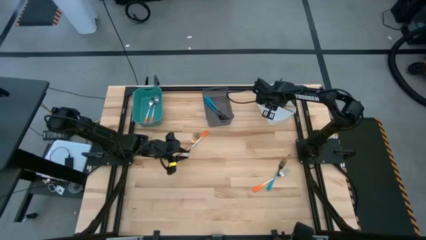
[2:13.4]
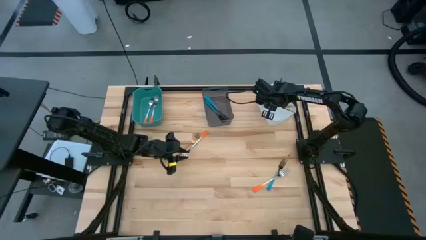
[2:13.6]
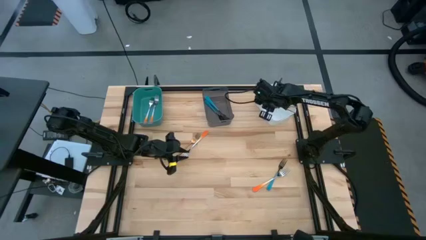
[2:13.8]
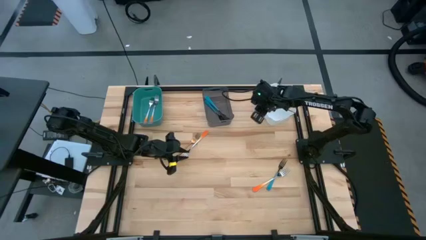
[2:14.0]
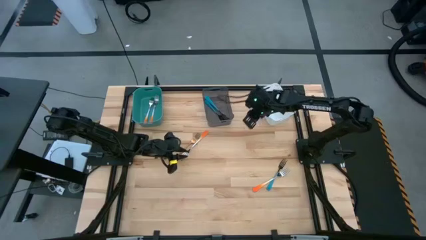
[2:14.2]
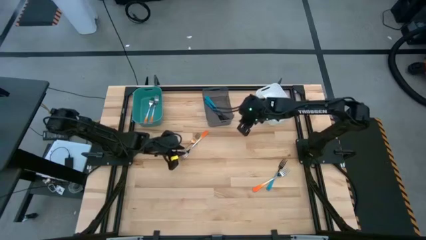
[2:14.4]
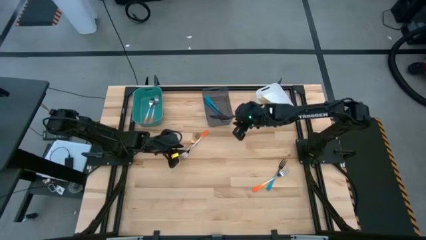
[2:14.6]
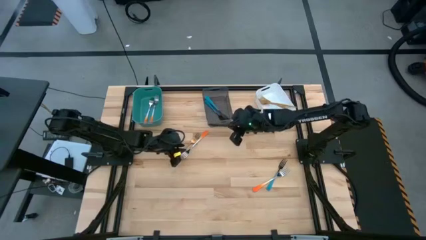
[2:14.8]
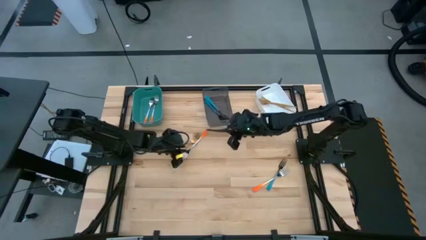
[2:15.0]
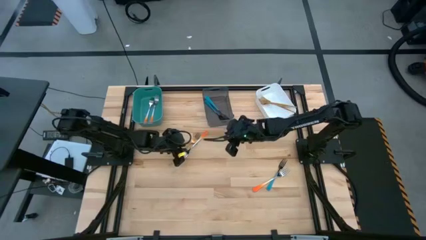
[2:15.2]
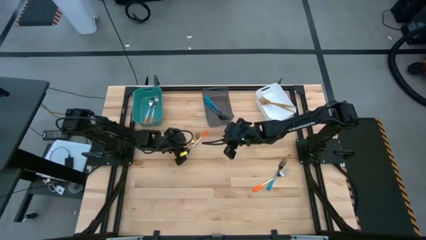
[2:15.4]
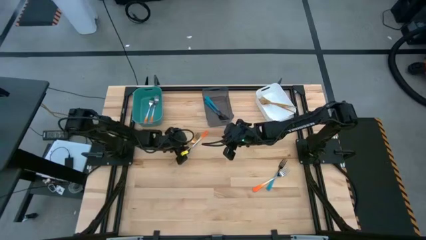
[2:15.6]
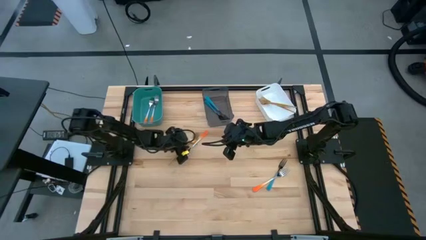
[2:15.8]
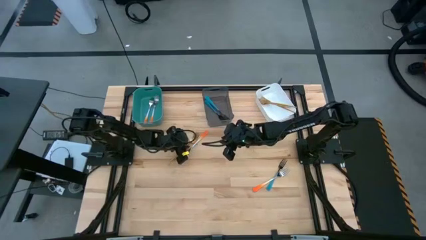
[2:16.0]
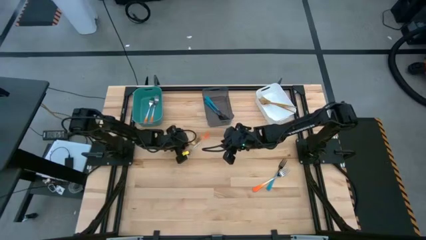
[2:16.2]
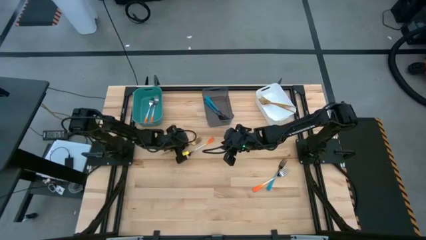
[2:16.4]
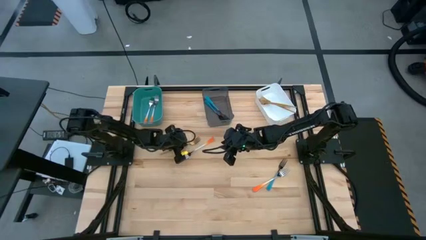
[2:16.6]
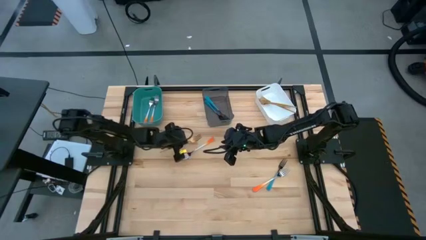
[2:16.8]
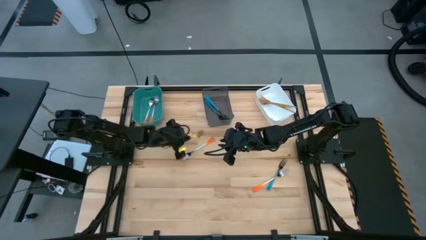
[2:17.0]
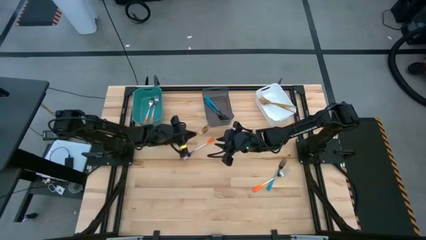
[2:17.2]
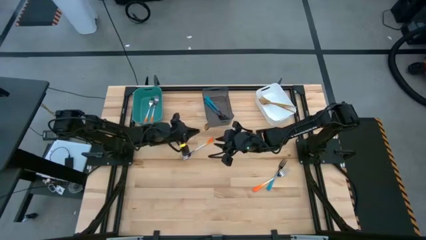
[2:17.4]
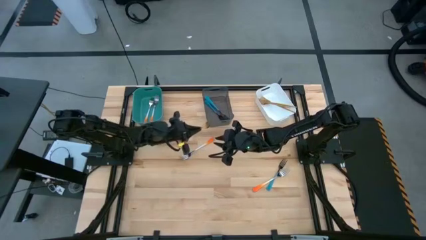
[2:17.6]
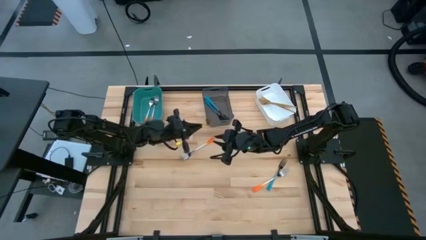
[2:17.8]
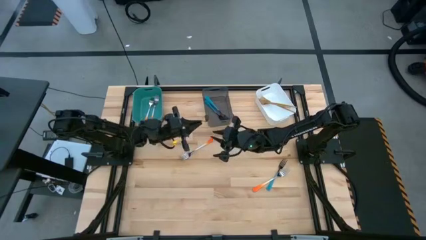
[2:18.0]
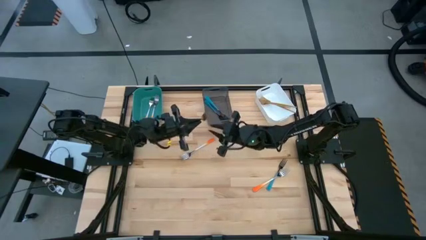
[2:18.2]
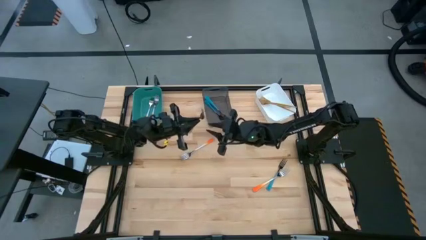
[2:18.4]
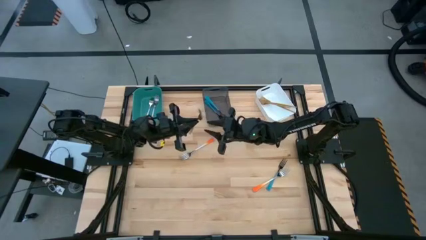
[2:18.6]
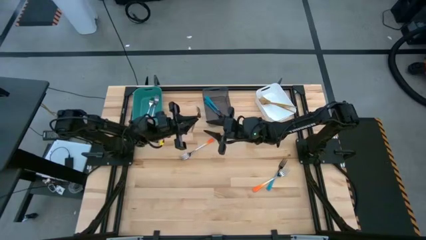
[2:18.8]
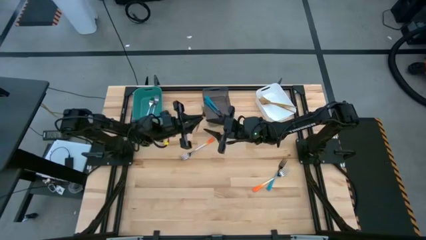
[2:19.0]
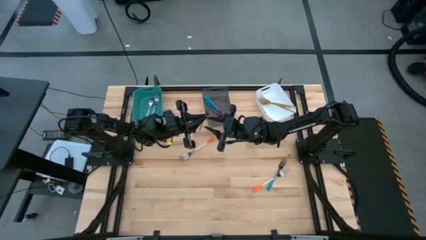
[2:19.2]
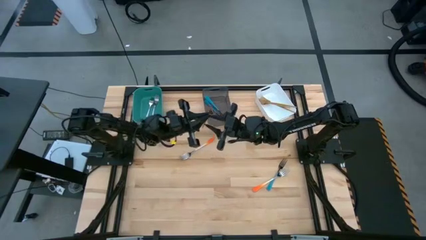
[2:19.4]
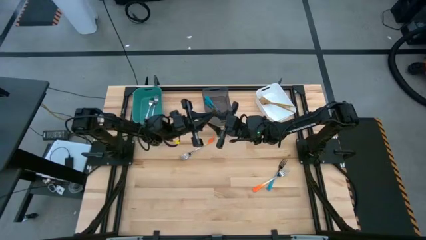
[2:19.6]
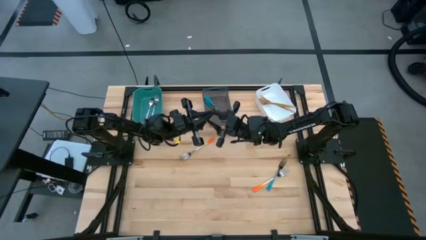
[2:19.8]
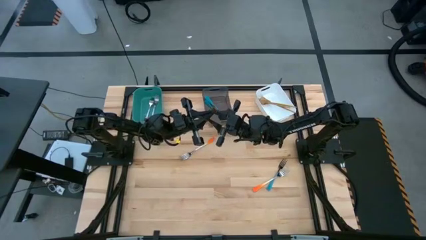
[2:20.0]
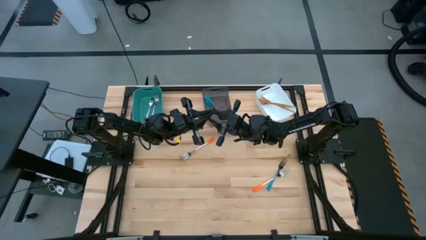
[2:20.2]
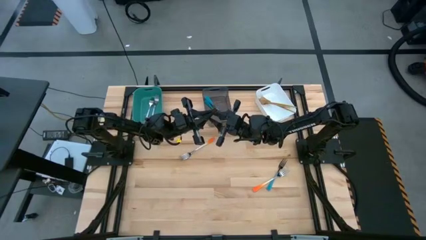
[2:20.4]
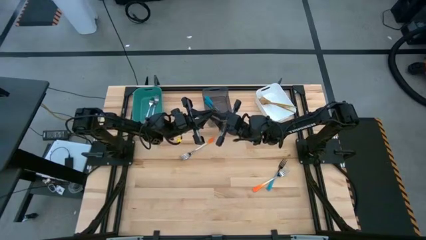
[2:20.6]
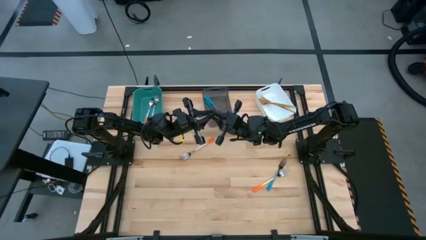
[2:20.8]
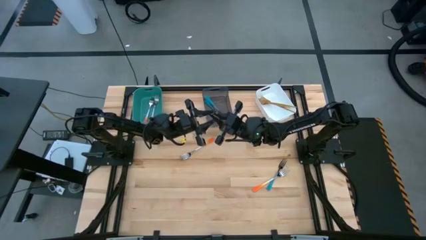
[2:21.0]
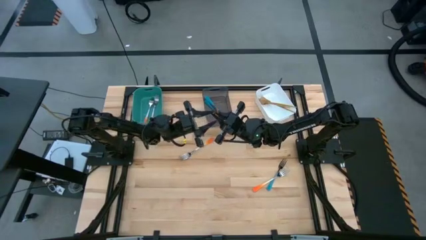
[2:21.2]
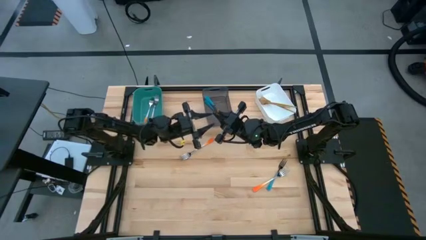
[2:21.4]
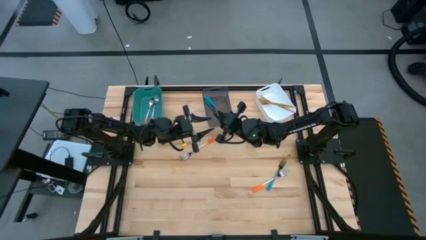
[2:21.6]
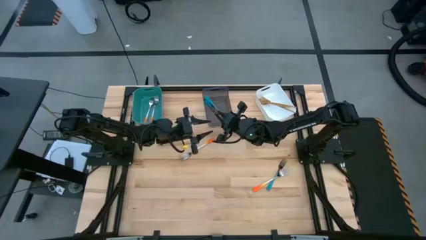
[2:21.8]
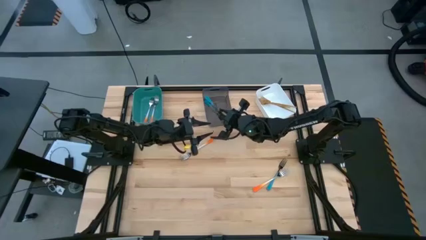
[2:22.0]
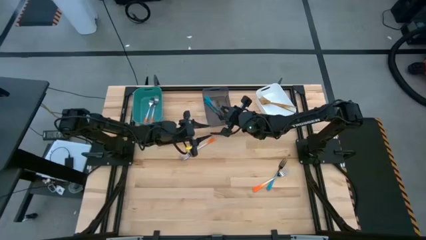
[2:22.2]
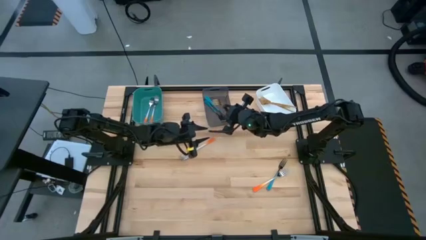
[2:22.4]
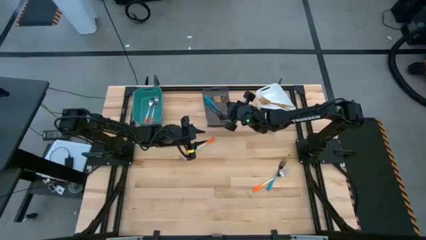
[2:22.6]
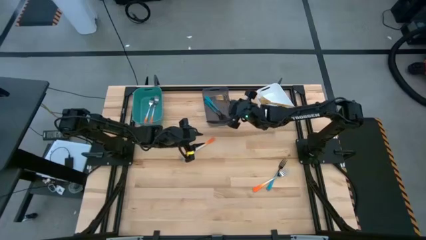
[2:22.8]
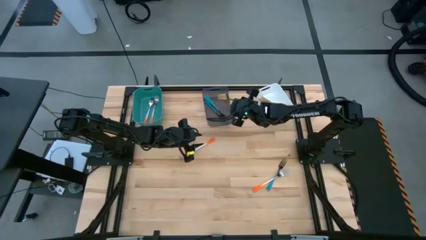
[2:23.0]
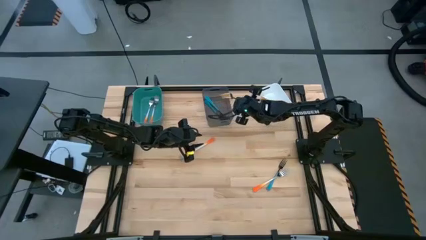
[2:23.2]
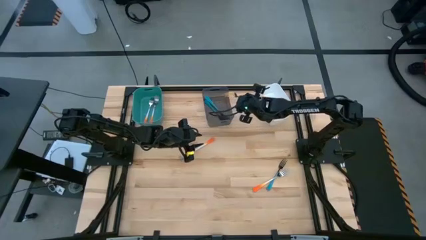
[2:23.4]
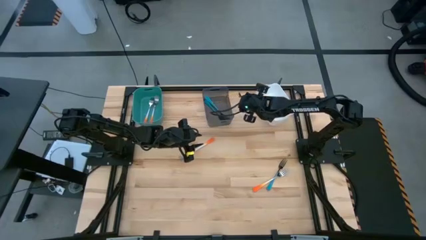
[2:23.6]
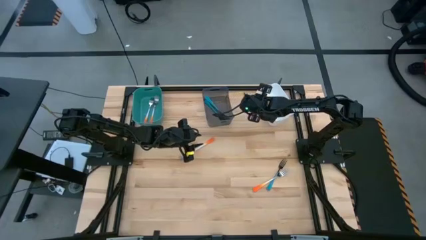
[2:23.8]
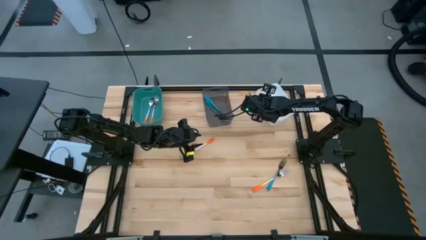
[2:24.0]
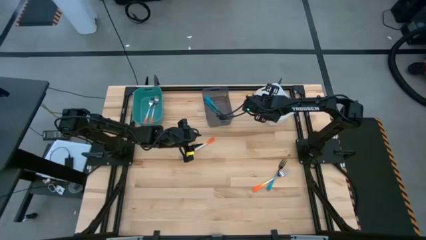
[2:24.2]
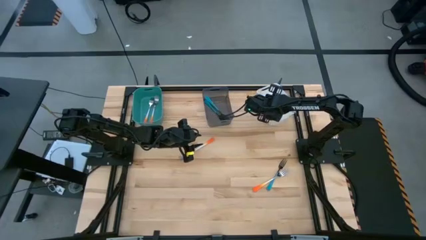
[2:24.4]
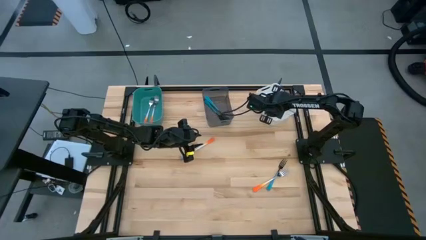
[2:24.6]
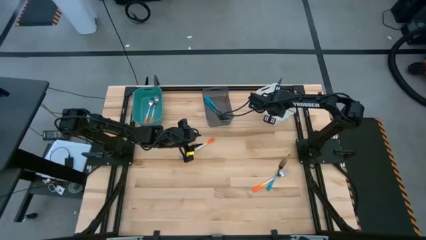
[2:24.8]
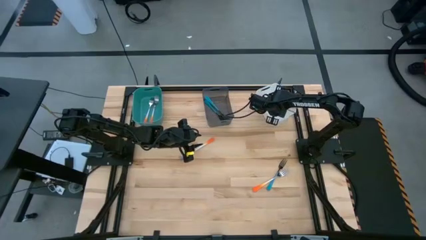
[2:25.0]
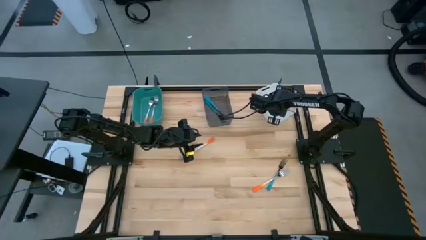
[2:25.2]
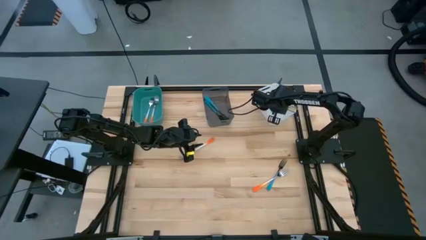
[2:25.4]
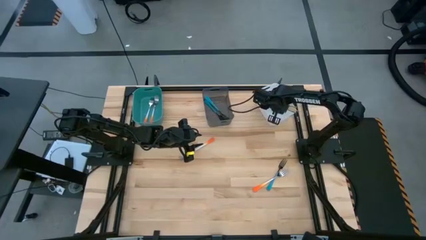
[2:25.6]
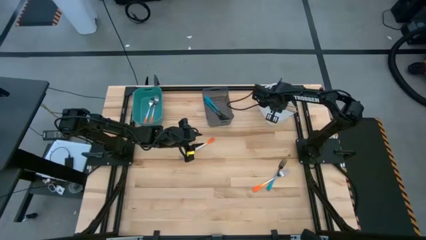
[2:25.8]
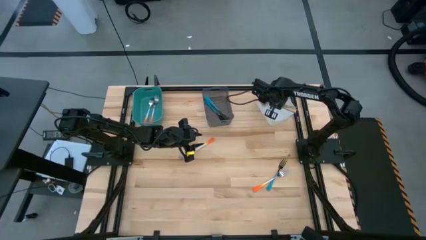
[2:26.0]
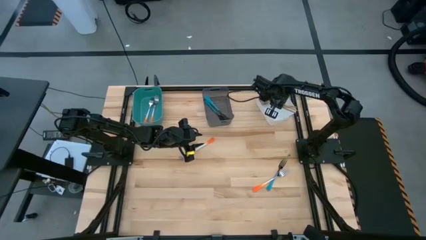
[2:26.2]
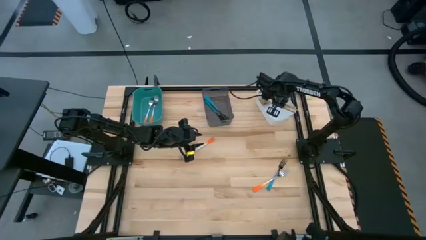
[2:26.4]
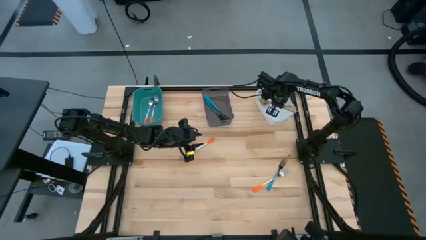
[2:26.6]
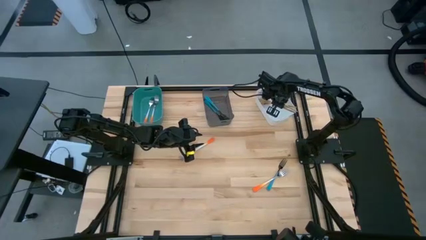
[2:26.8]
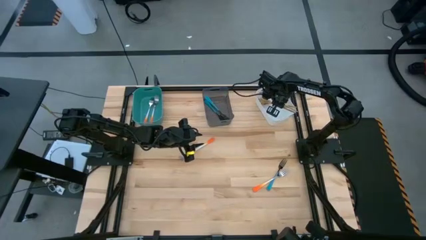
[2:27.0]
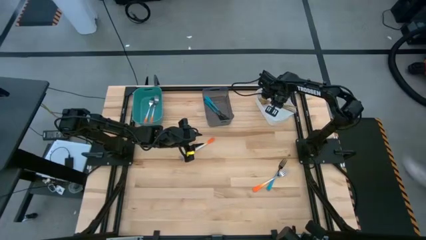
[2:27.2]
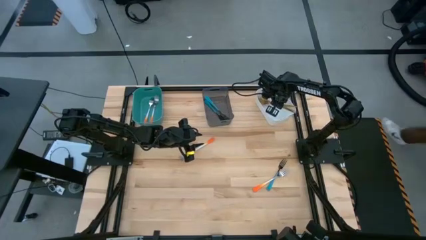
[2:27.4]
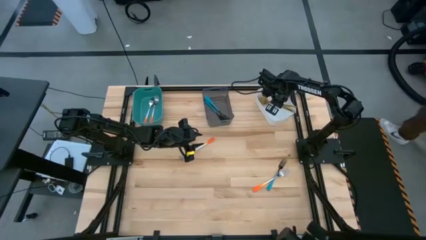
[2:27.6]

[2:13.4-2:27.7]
Task: Sort silverware by color (type)
Put the gold fork into the white bin
